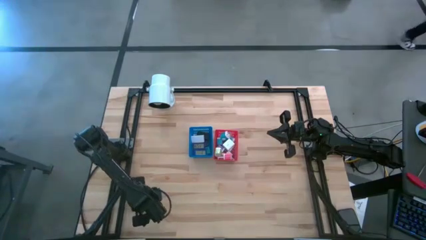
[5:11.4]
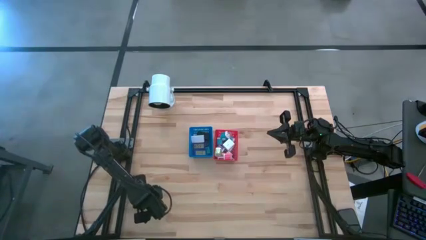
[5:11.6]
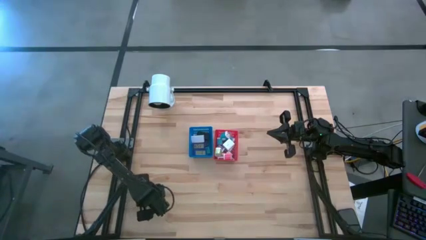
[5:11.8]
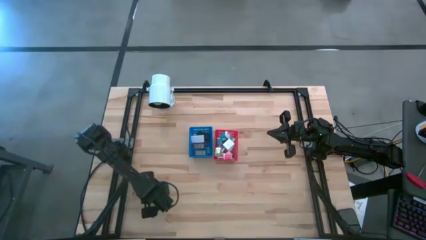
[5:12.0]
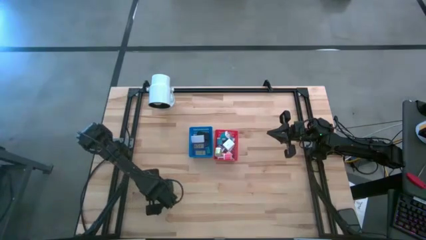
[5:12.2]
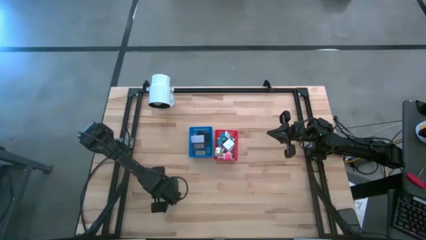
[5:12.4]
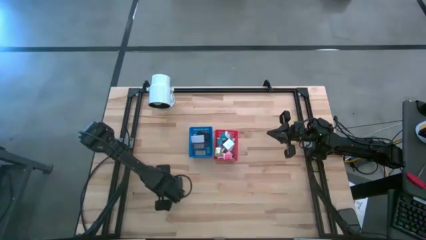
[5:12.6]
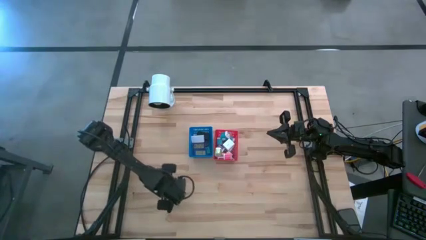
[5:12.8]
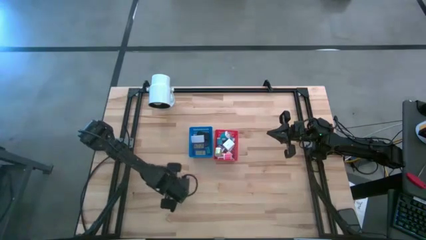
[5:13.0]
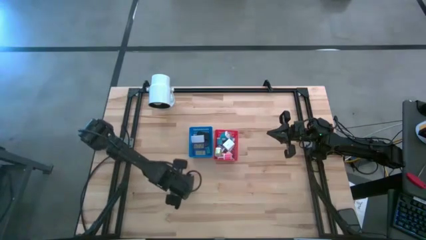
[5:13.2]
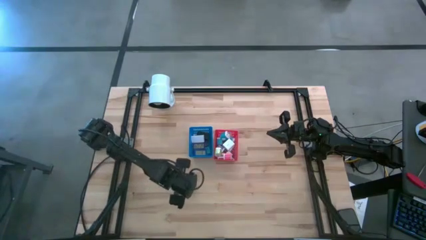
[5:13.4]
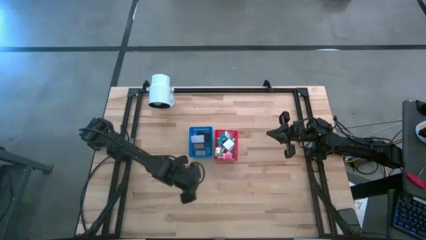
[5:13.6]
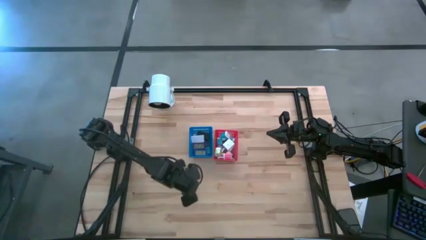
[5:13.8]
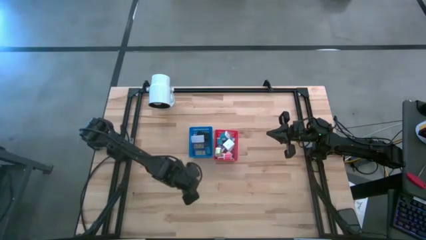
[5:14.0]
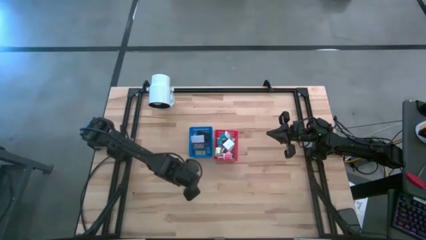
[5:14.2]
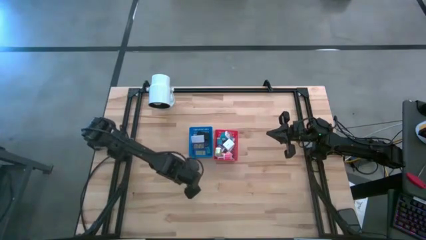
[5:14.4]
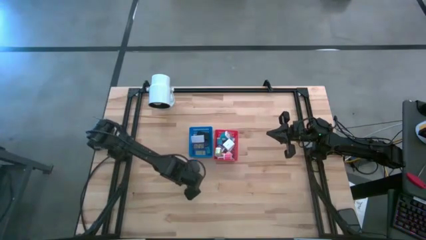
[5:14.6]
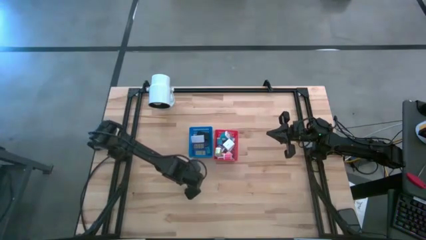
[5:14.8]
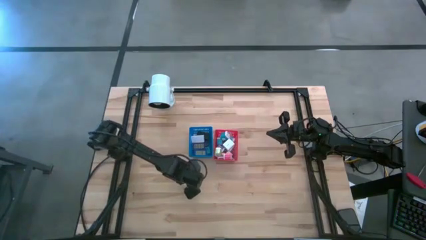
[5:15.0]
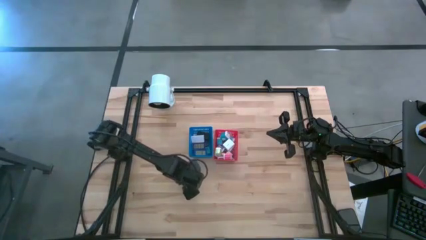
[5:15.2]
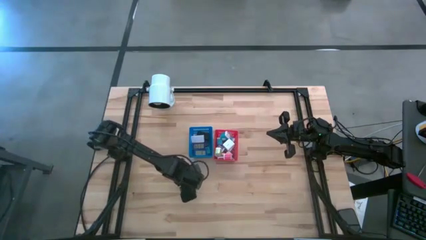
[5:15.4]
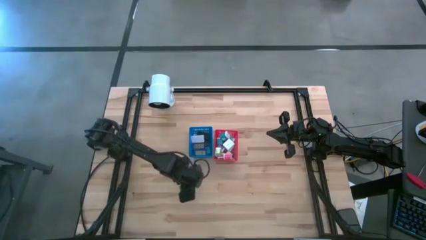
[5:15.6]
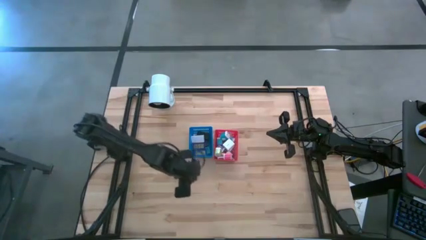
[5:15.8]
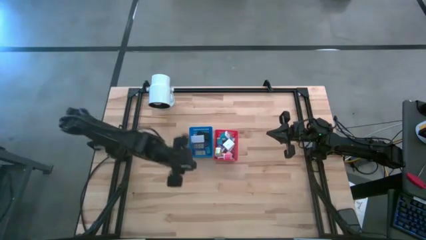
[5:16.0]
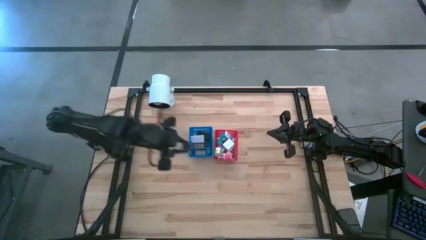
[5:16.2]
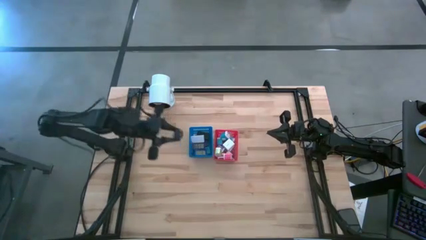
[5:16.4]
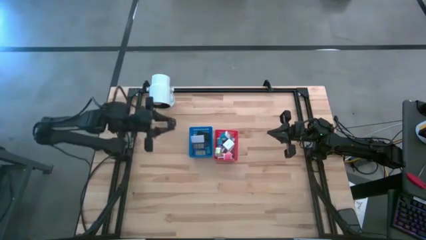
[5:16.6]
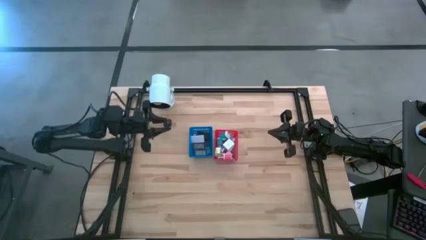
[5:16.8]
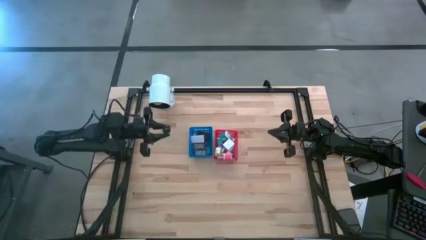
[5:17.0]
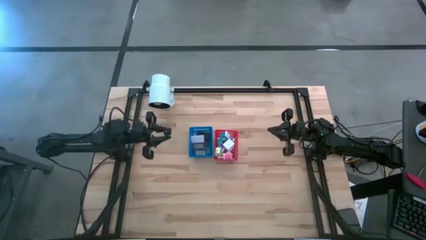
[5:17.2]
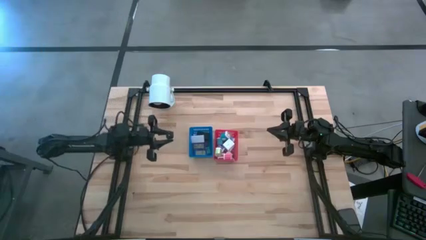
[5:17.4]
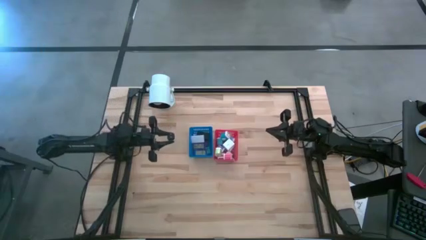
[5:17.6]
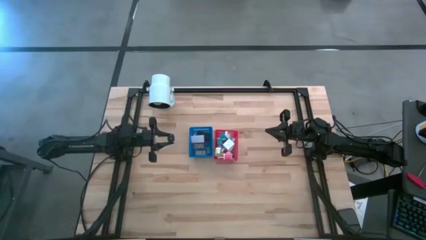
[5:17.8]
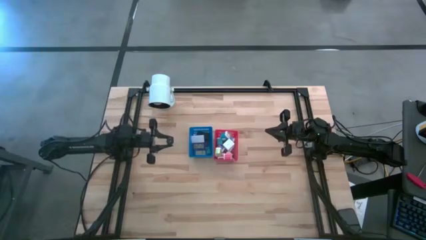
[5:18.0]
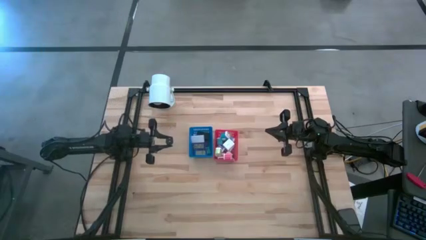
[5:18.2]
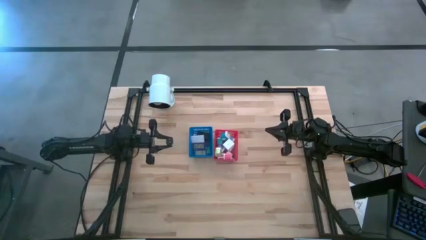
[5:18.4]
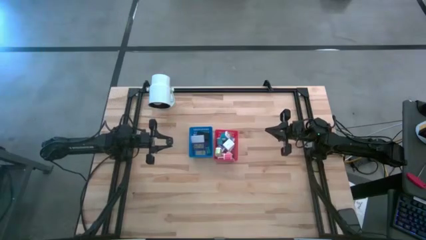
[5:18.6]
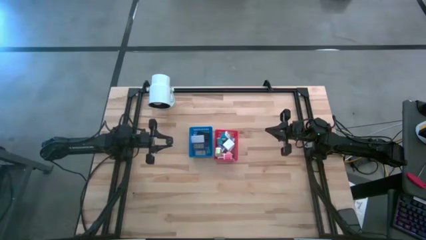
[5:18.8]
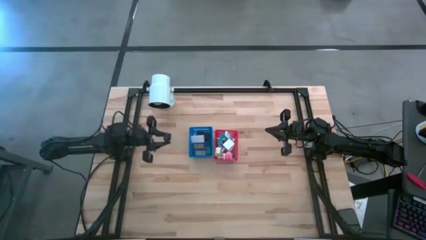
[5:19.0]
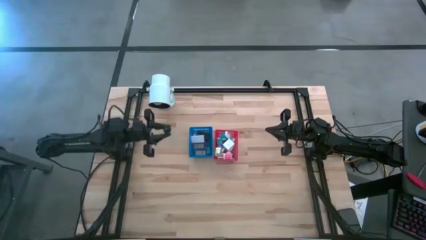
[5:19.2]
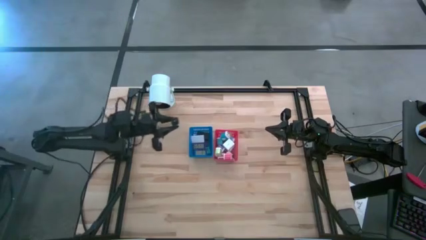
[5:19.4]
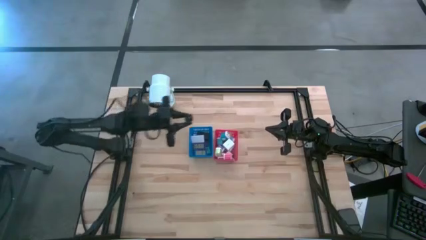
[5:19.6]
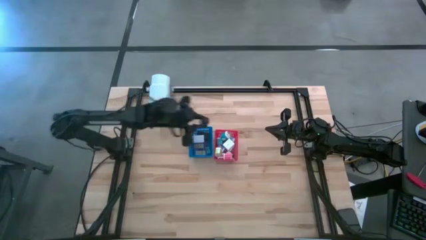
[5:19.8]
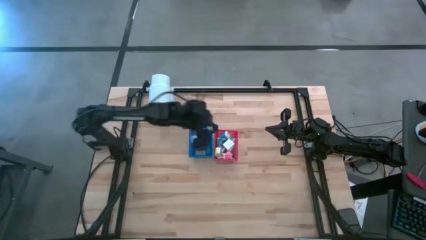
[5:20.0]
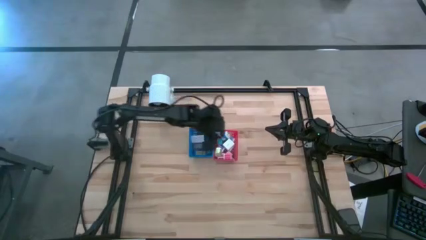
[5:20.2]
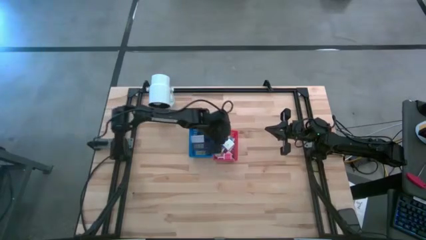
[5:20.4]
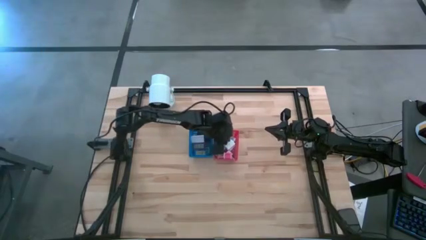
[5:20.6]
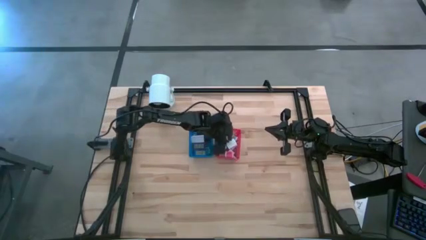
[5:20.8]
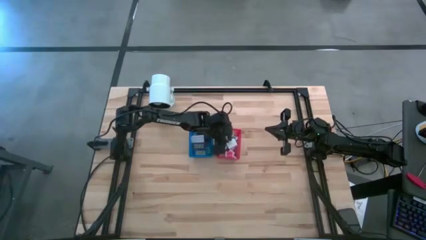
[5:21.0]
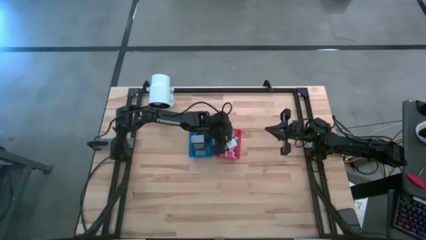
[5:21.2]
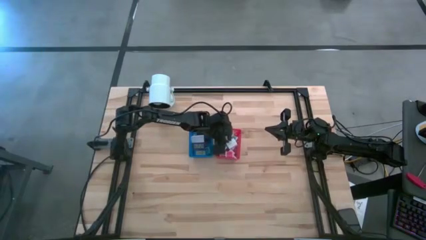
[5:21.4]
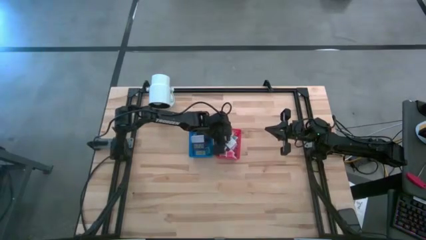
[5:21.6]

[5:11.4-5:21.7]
Task: Pick & Place Office items
Put the white charger adapter into the red bin

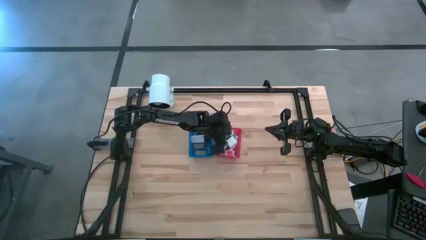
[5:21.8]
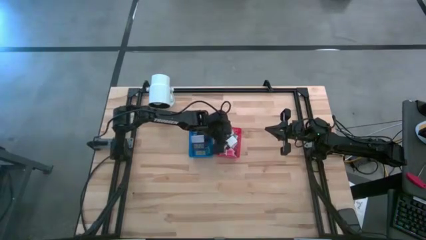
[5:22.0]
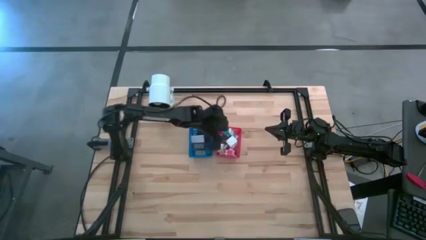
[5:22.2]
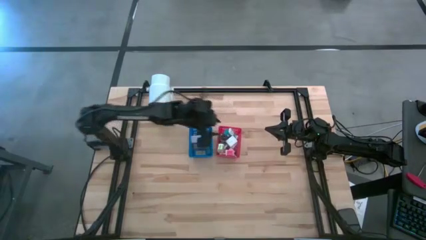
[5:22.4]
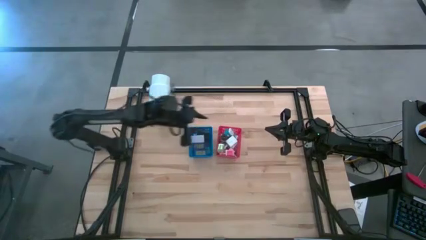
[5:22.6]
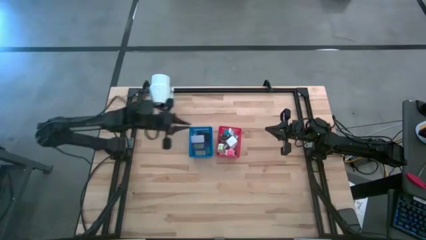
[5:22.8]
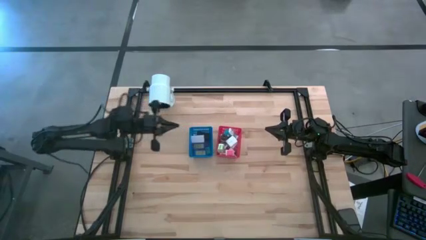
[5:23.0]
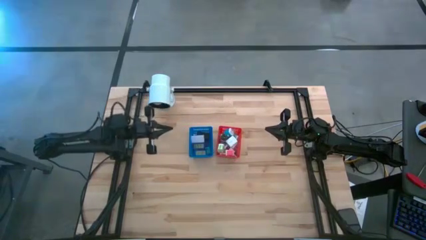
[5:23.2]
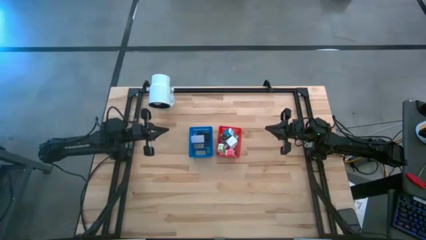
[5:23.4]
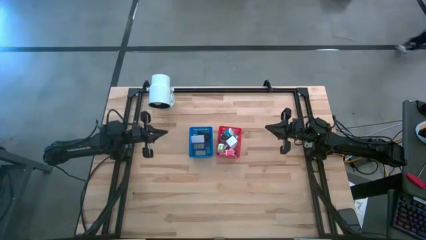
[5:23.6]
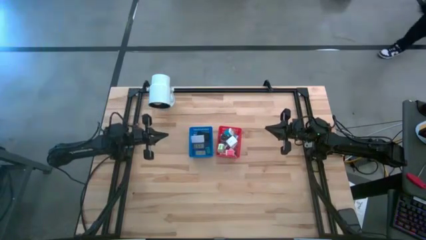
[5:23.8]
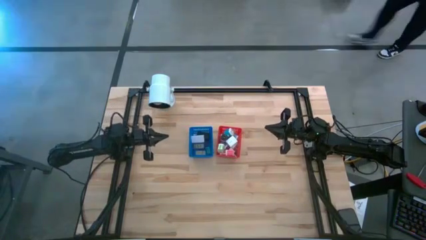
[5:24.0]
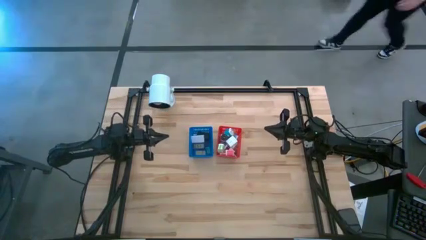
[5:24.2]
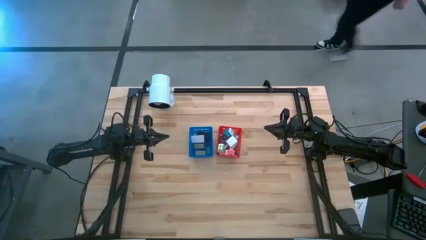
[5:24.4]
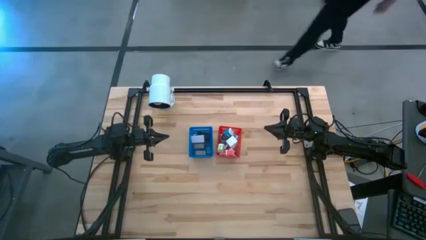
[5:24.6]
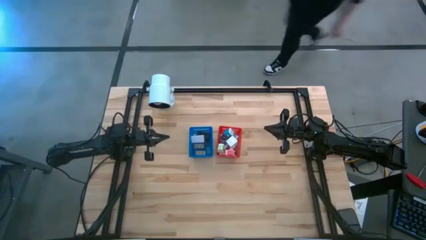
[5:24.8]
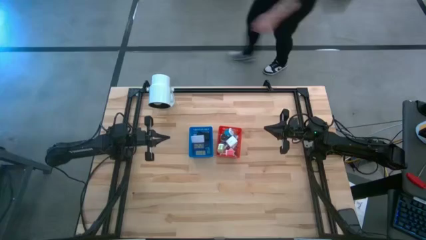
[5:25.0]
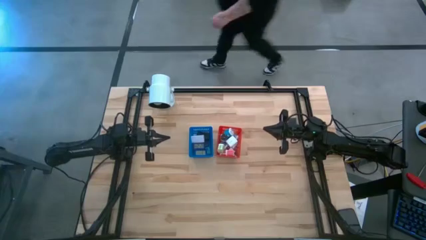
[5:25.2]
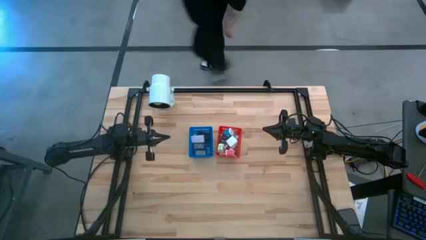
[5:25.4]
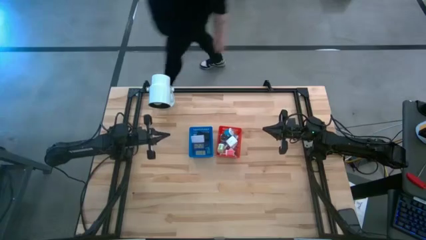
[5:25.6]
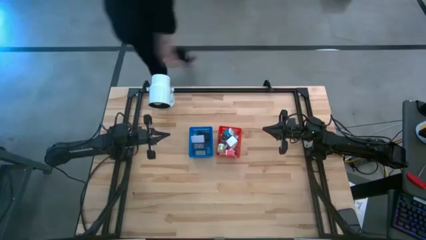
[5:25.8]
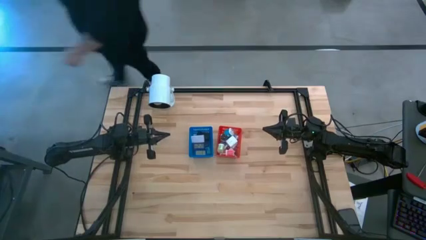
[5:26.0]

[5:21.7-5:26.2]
Return to Home Position
